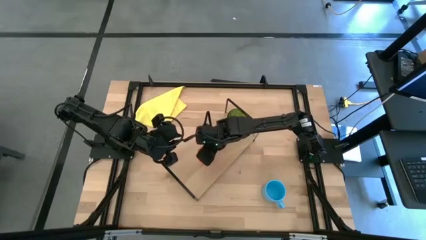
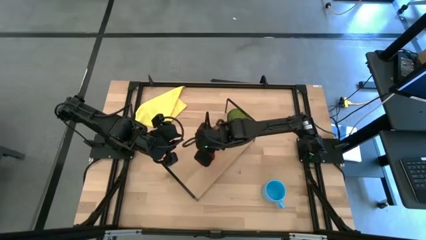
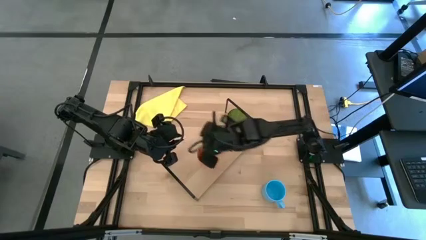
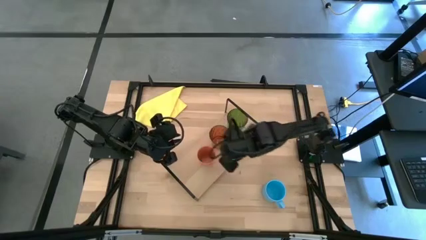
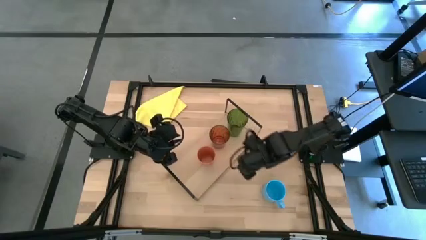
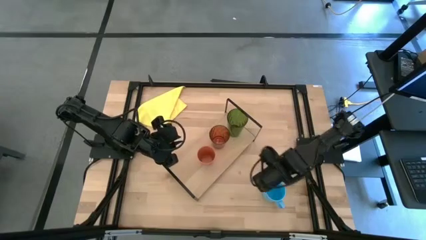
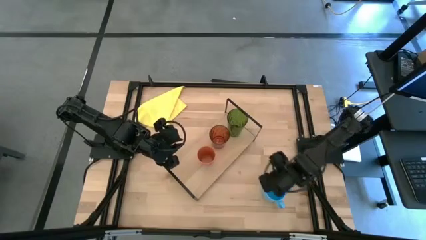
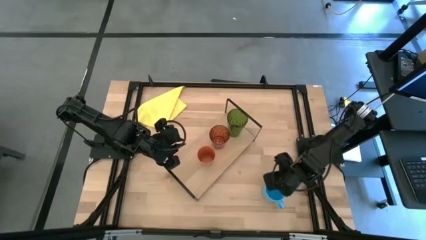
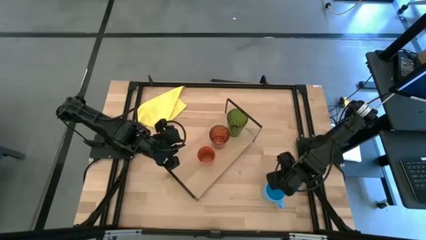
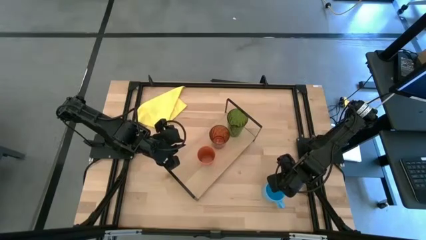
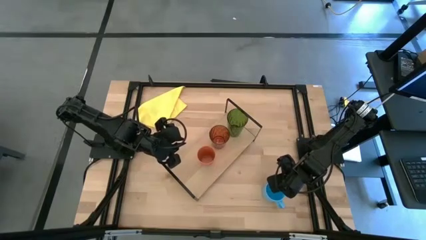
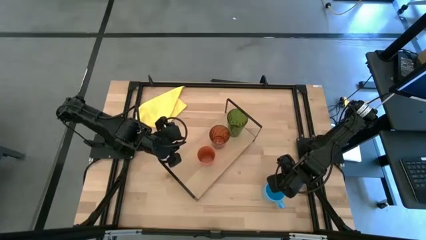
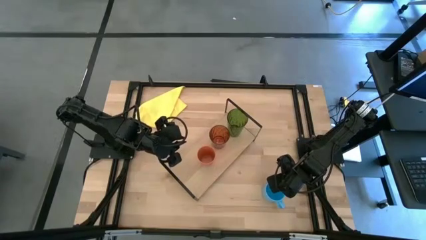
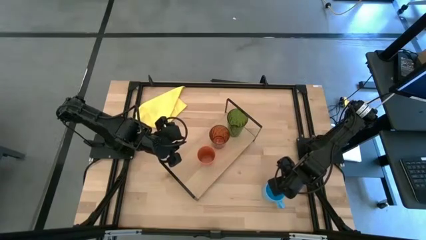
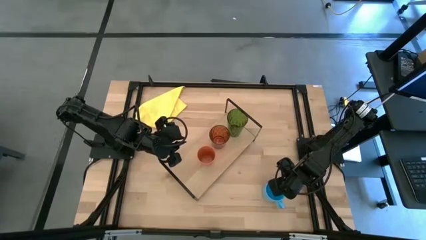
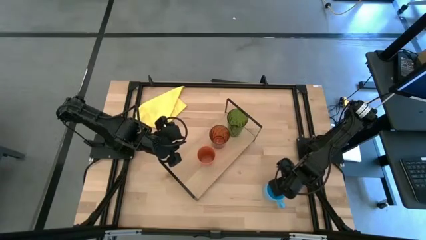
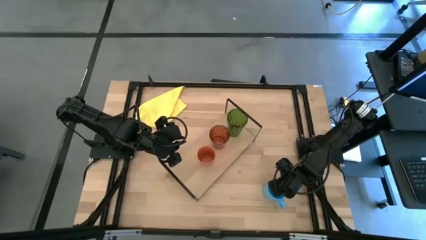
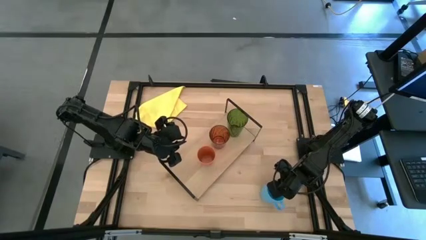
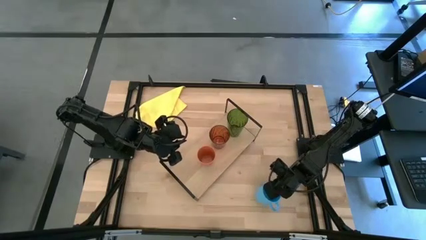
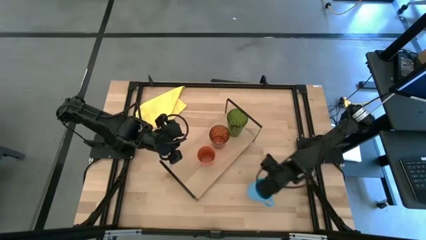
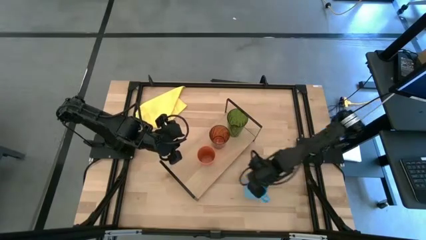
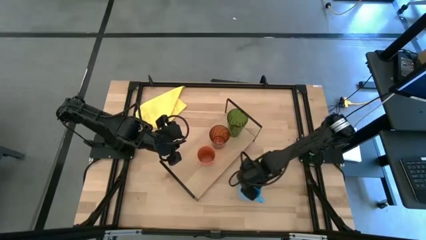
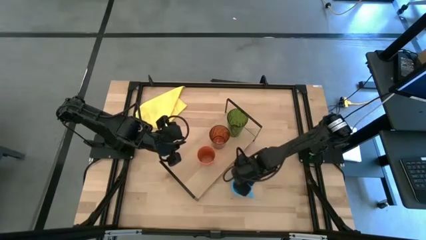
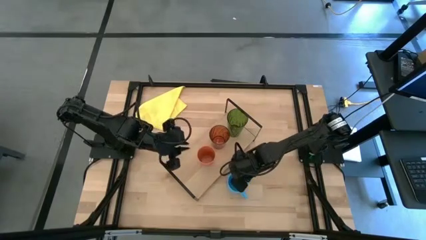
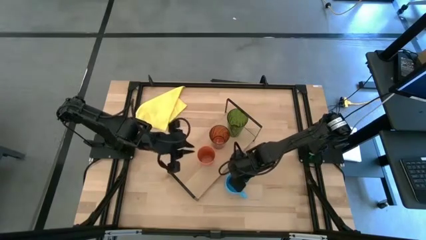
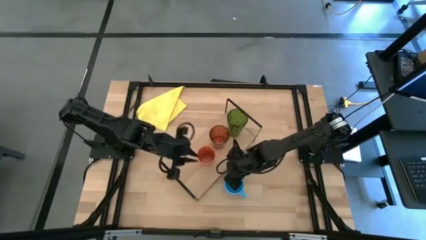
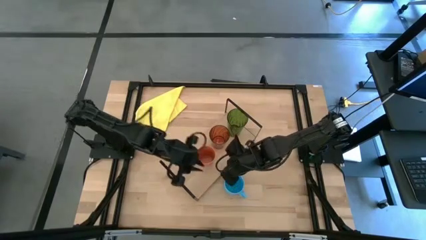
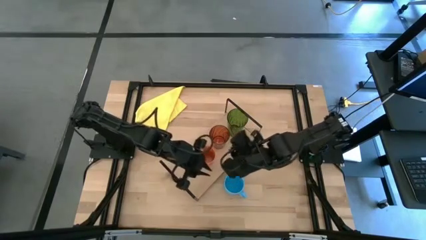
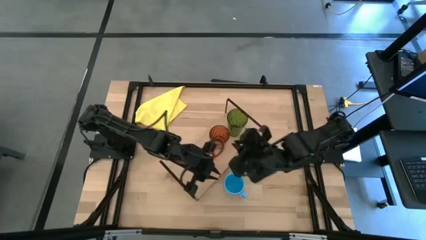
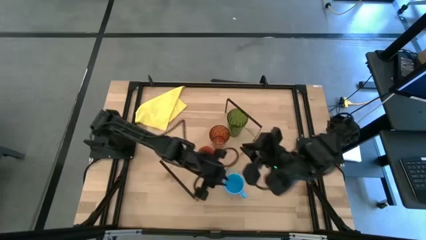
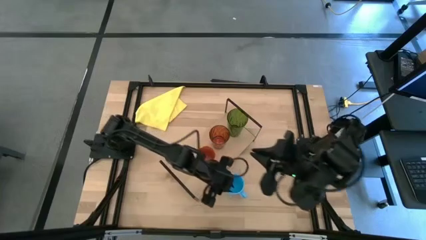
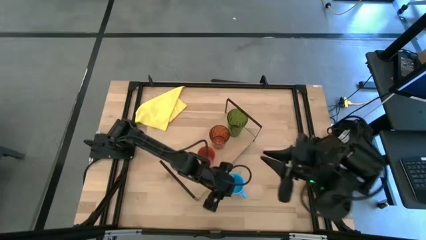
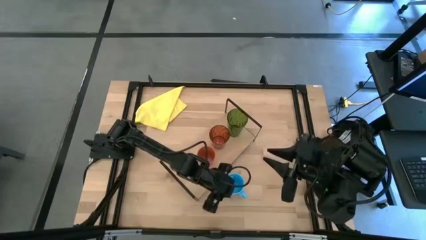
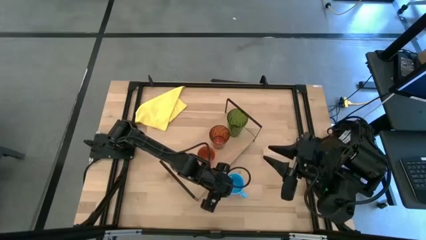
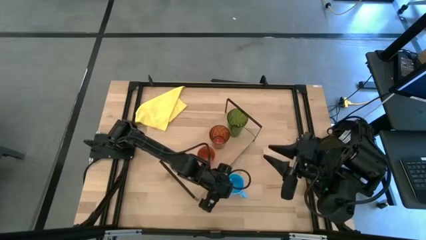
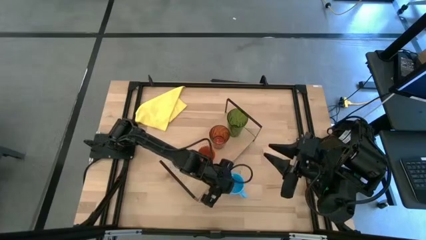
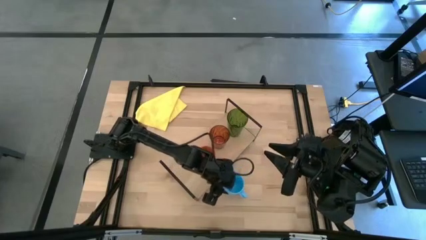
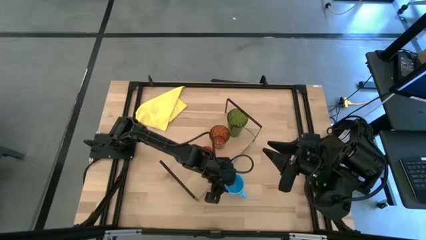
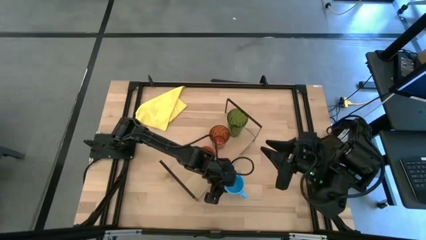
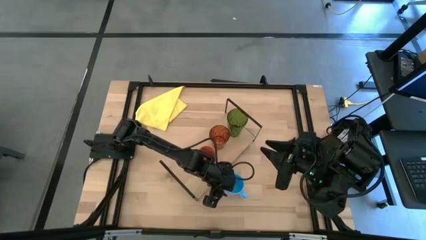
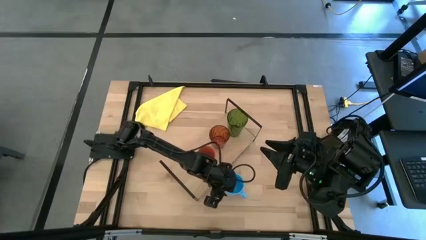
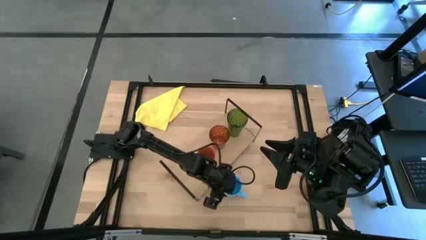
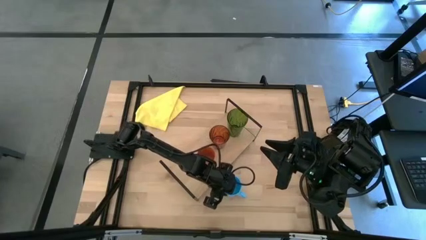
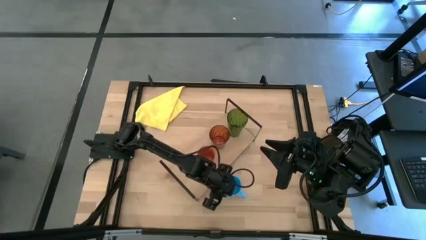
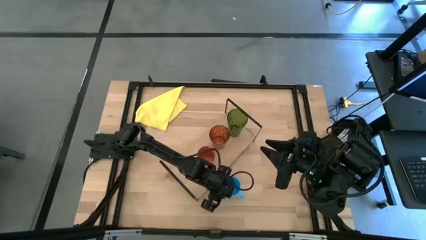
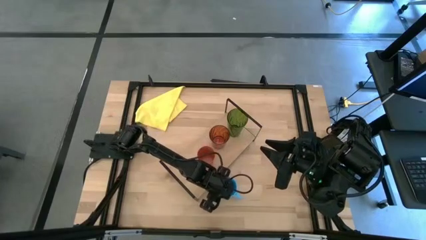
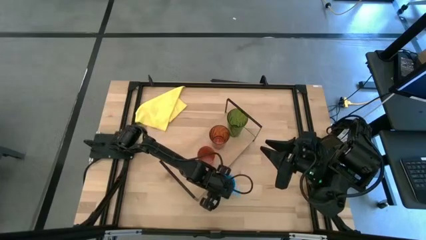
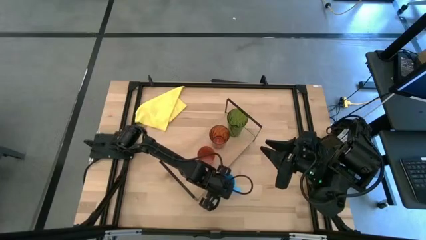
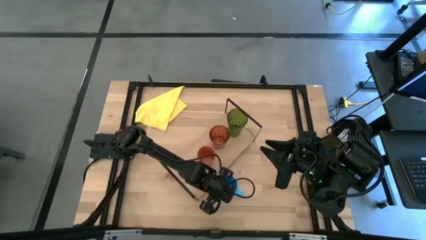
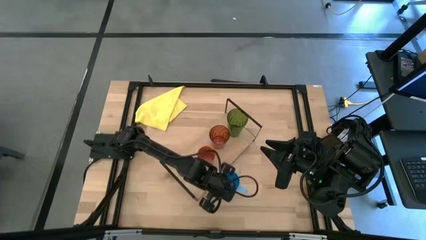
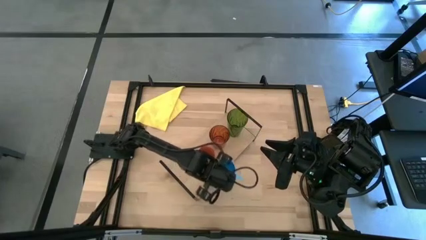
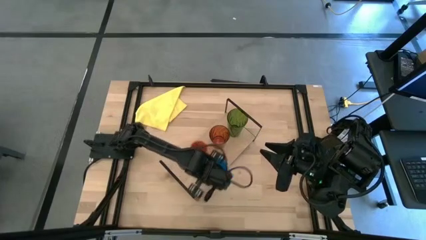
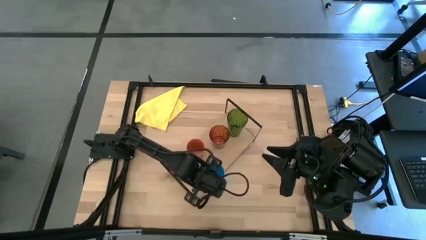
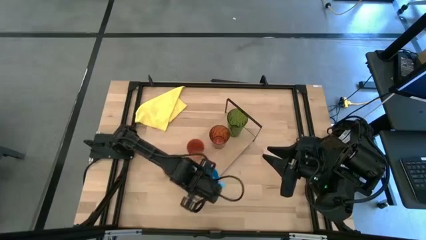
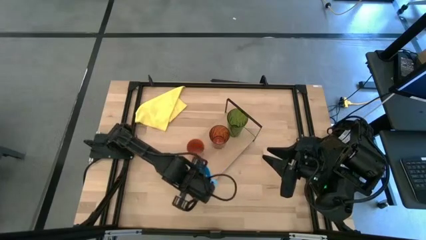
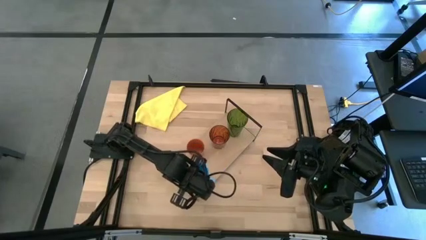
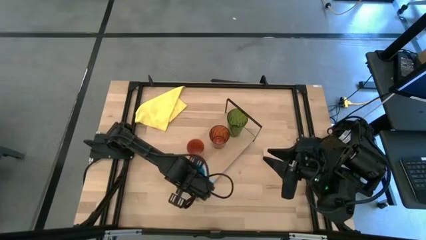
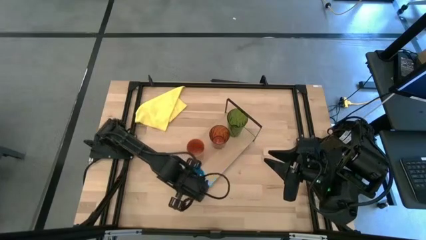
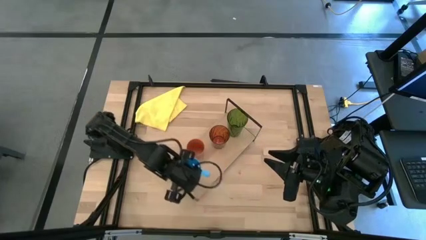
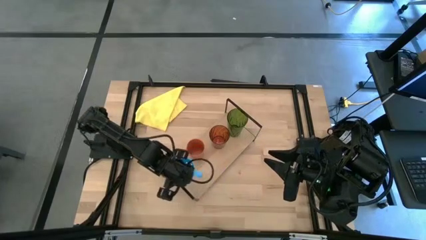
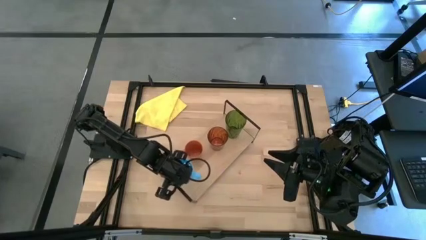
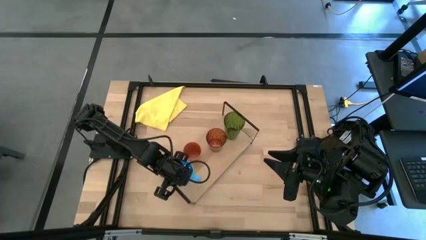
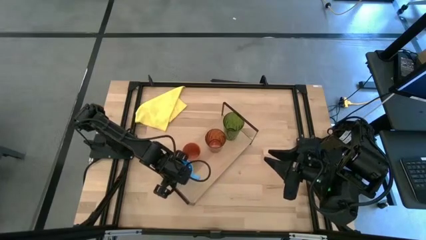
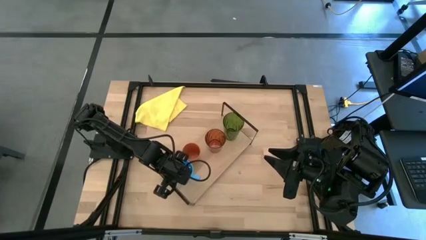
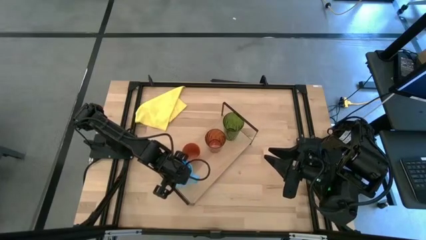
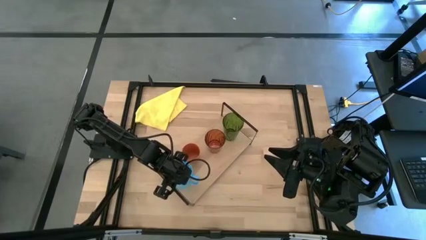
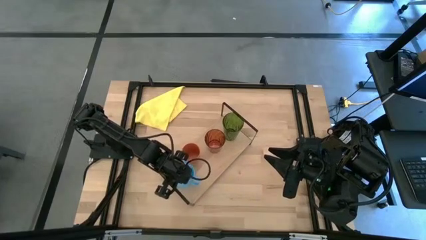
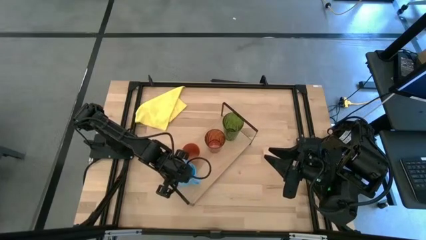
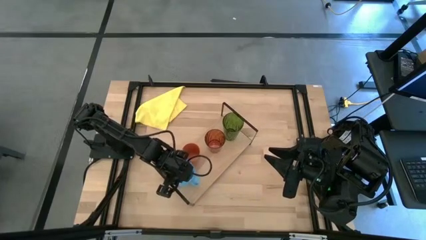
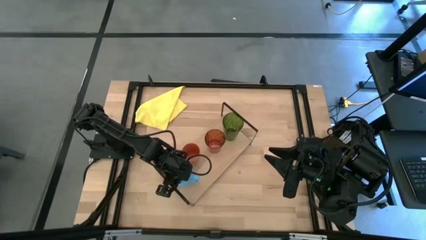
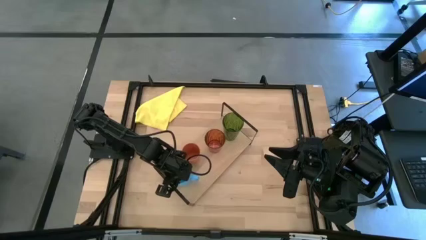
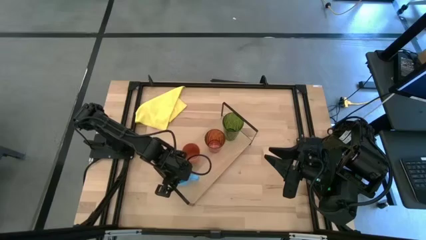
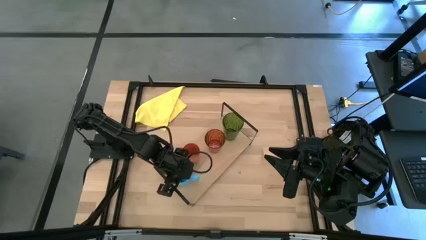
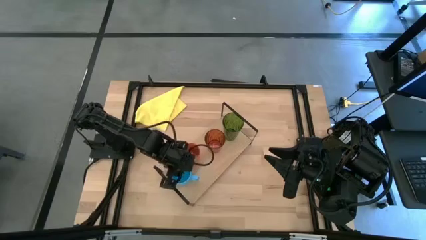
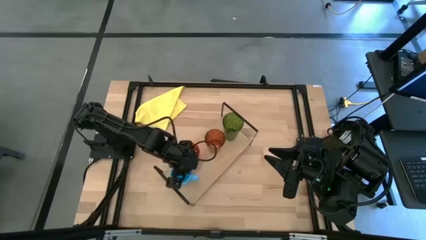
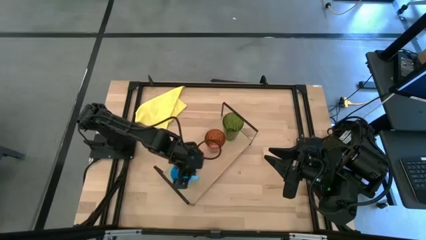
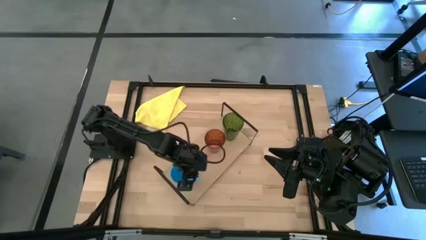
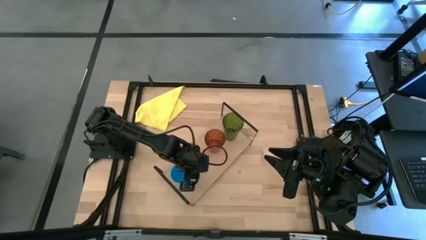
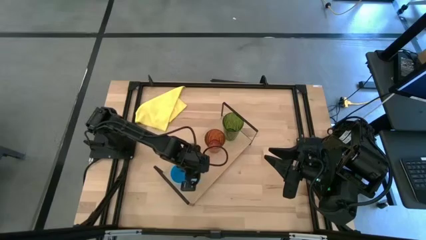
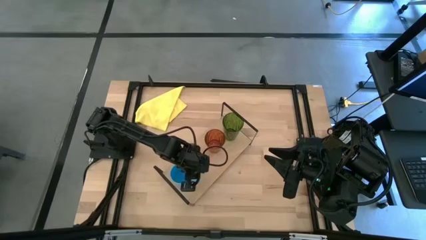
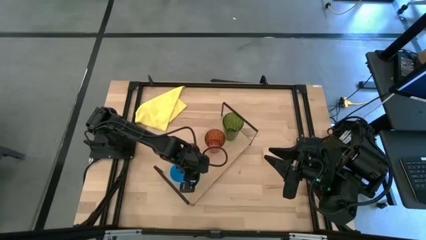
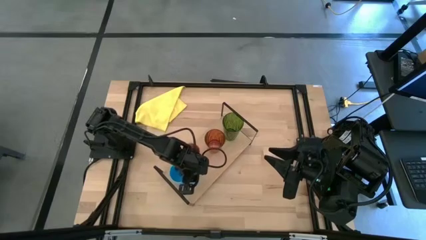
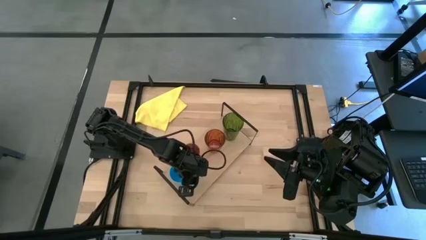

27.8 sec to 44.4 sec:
Task: Stack small to large cups/mugs on shelf
Put the blue mug on the shelf
